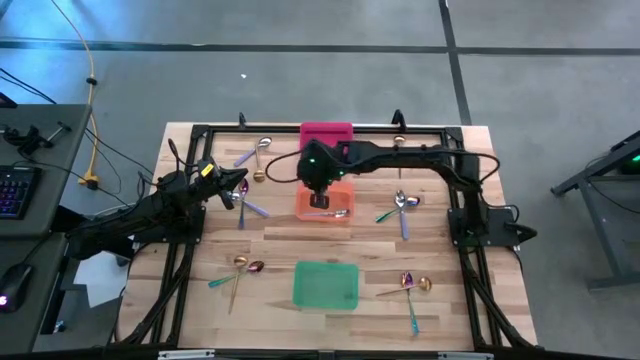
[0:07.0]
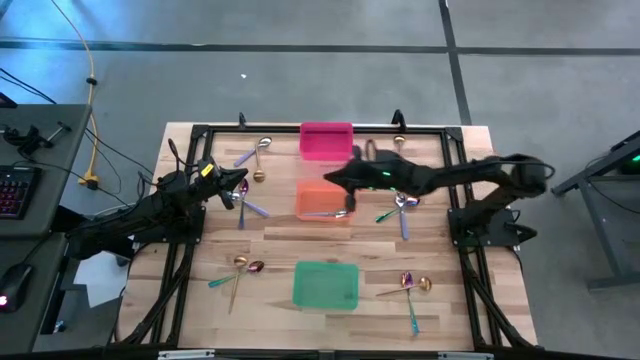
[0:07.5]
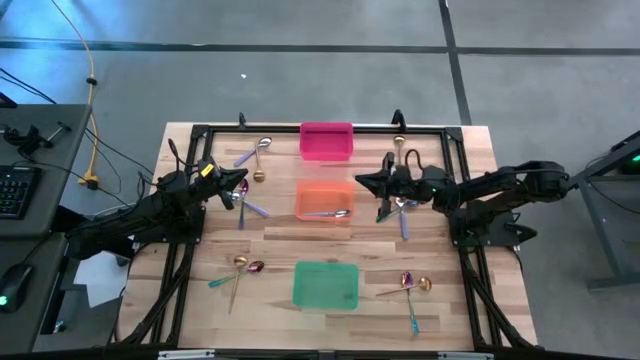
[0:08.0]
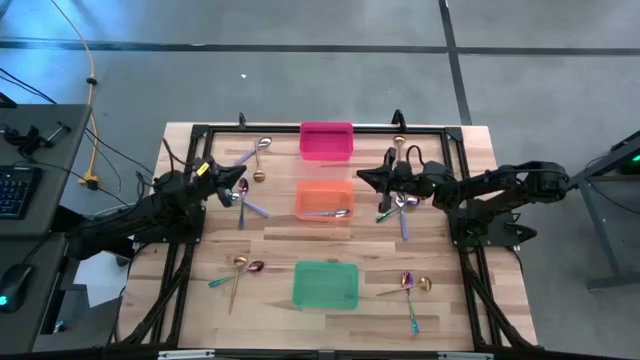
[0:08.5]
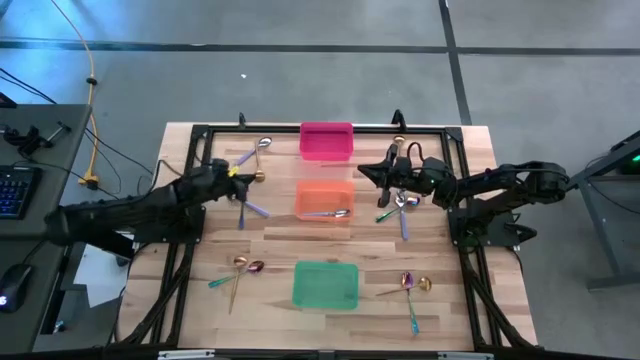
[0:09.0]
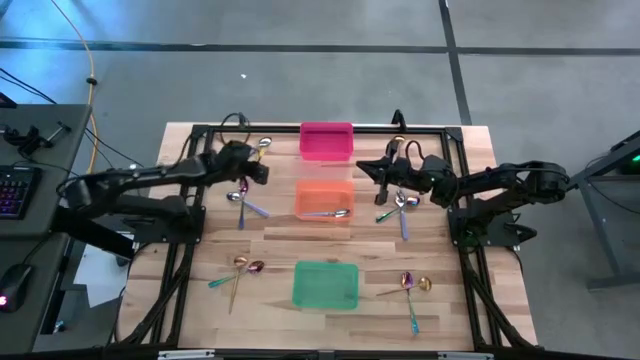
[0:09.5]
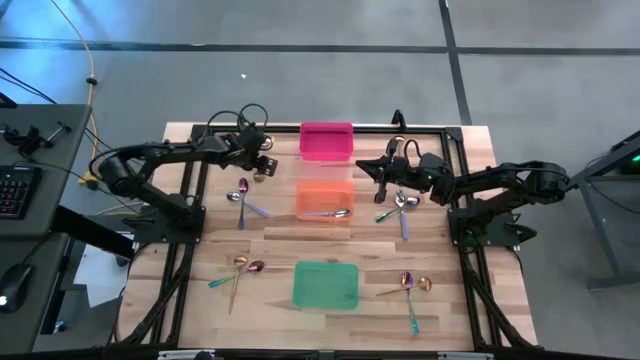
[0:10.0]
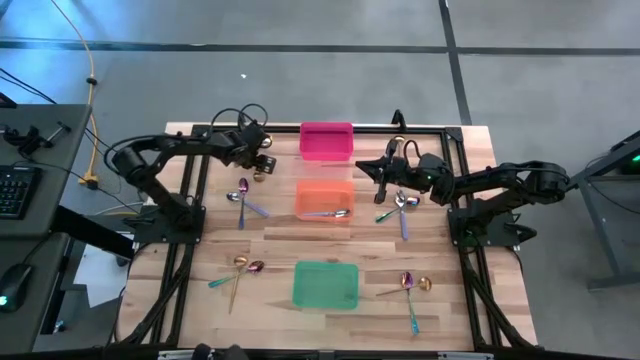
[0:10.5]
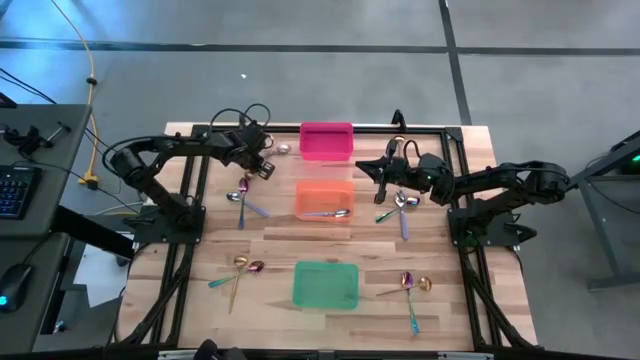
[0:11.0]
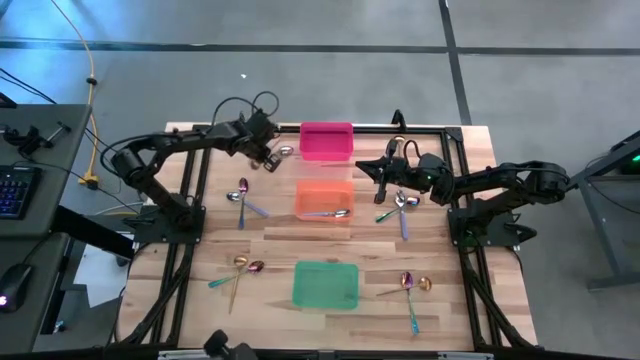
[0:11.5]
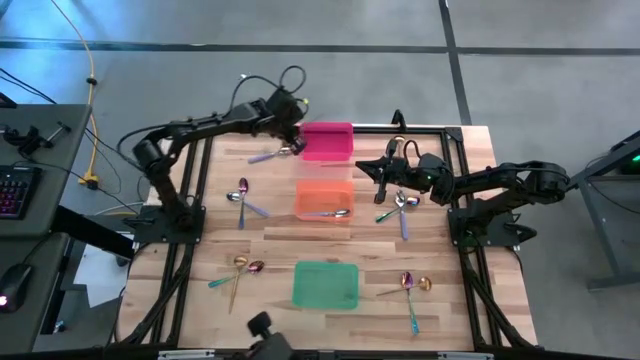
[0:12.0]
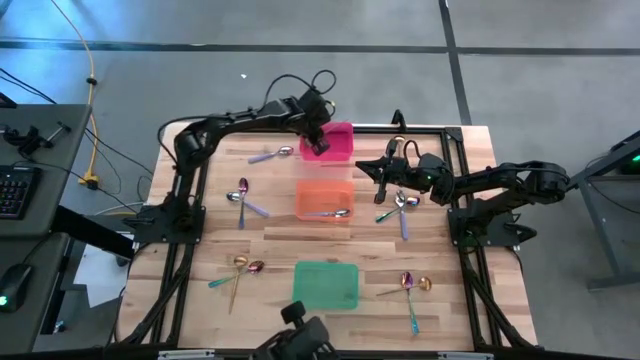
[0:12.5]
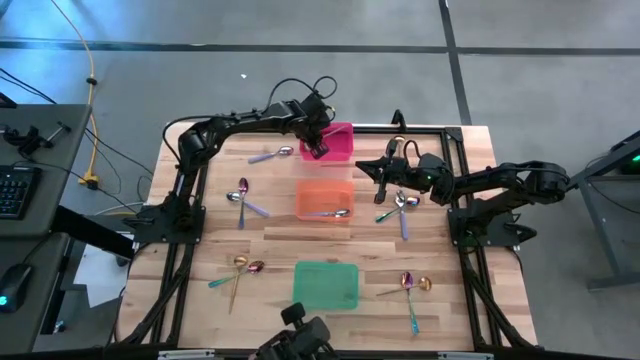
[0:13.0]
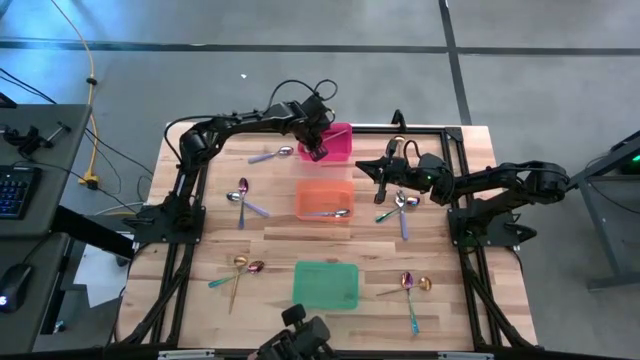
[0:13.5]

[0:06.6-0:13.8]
Task: Sort silverware by color (type)
Put the gold spoon into the red bin

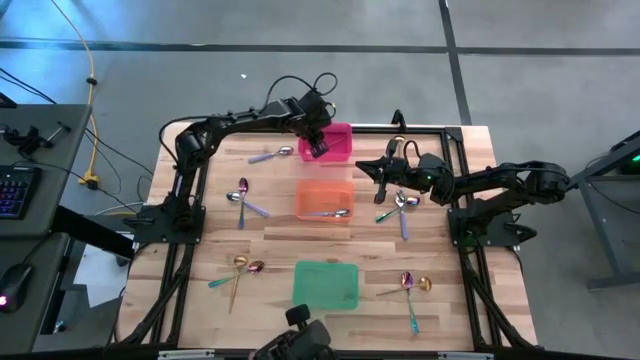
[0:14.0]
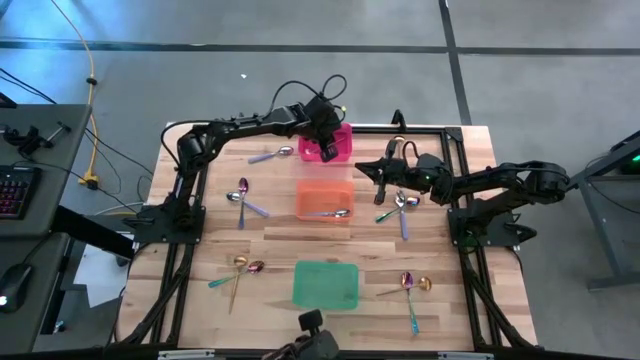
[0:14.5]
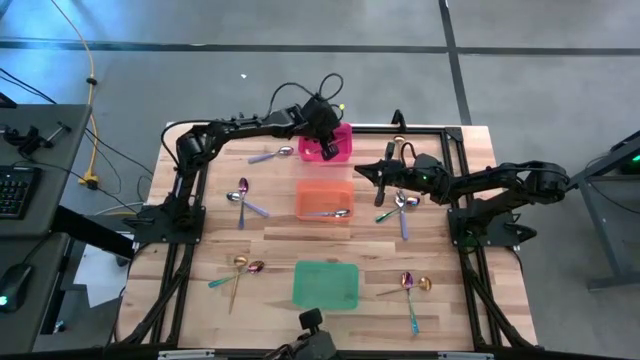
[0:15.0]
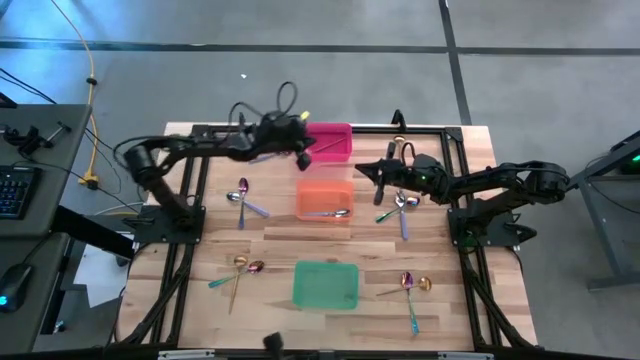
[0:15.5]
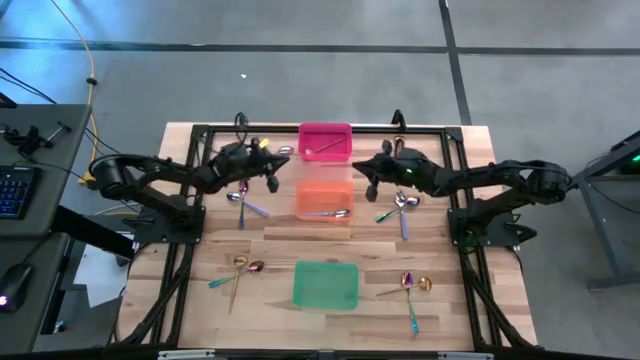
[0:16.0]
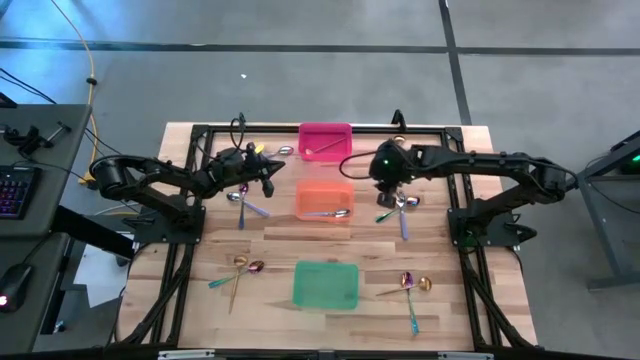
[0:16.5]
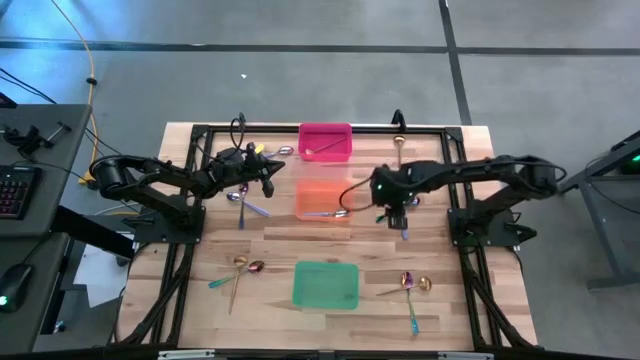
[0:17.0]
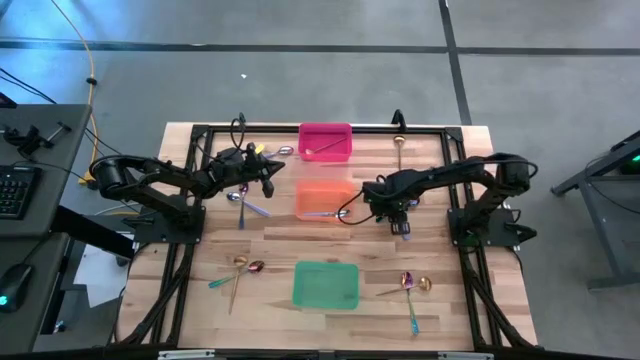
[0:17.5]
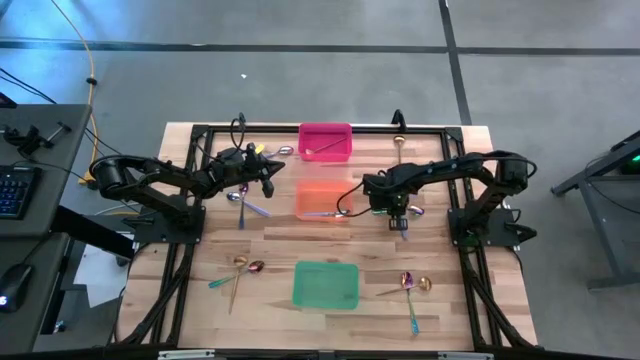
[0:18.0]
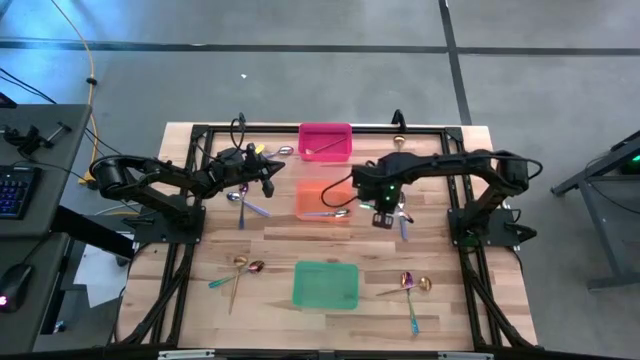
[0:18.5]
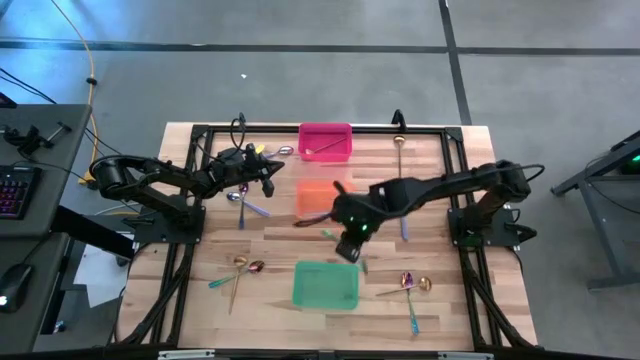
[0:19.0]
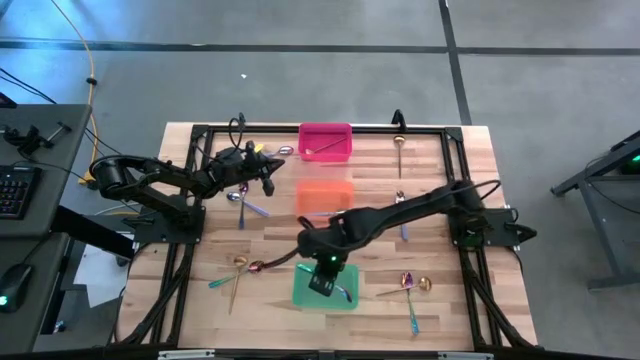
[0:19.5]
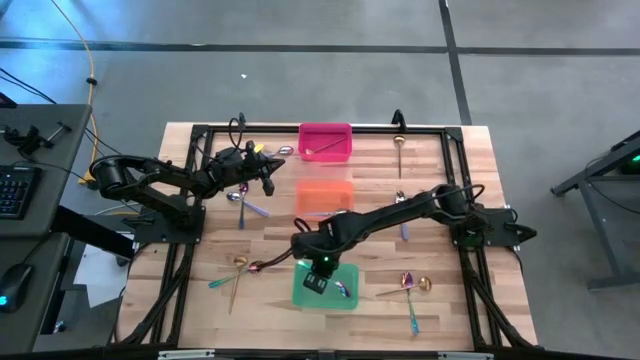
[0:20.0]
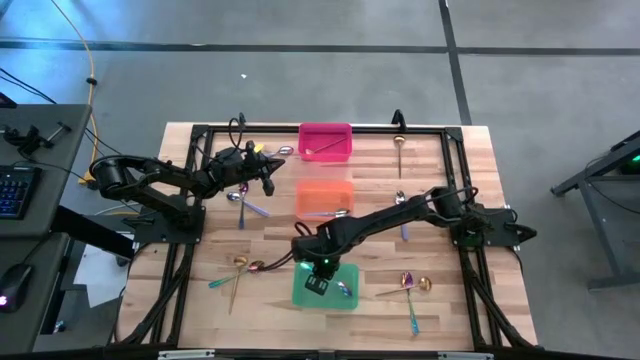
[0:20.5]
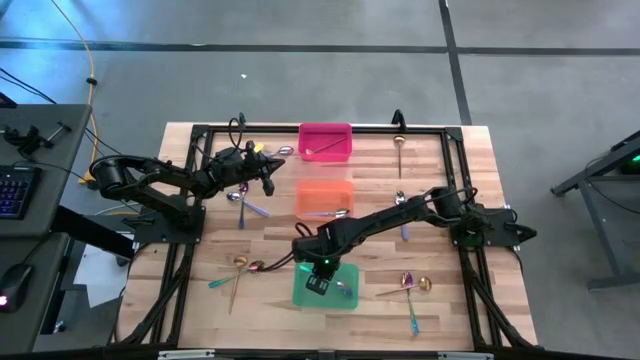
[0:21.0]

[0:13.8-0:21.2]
Put the blue spoon into the green bin

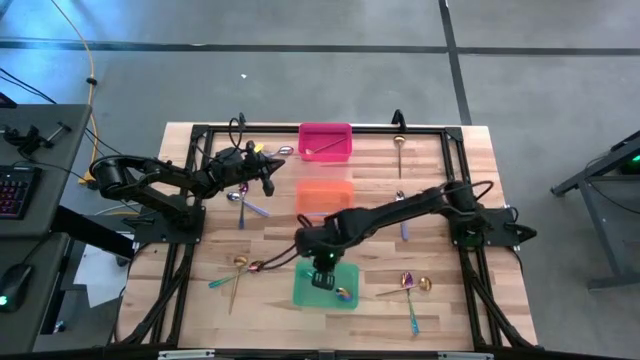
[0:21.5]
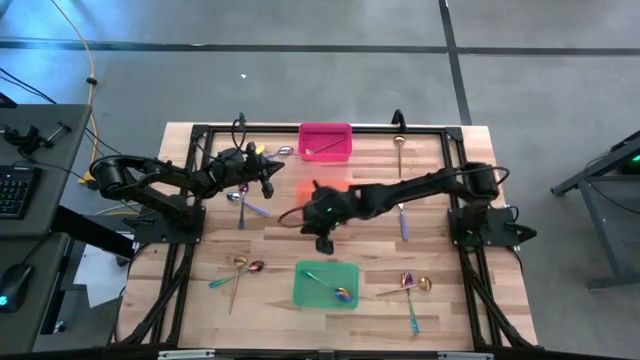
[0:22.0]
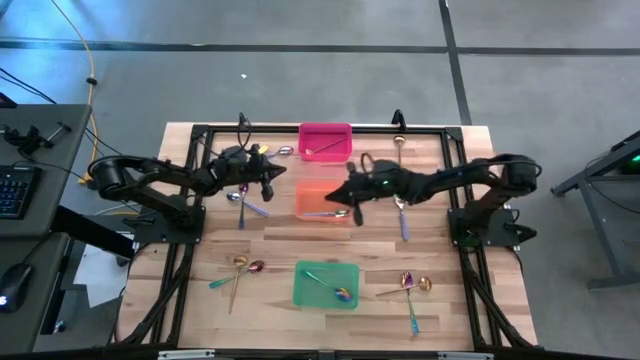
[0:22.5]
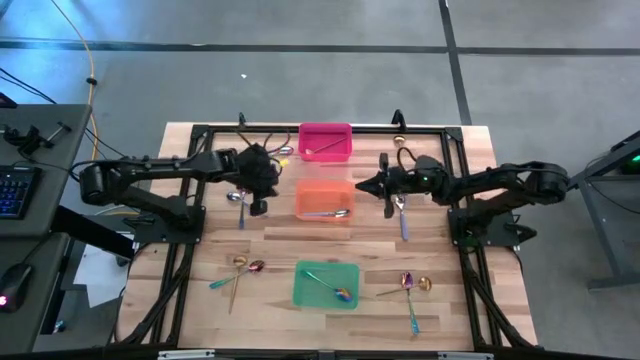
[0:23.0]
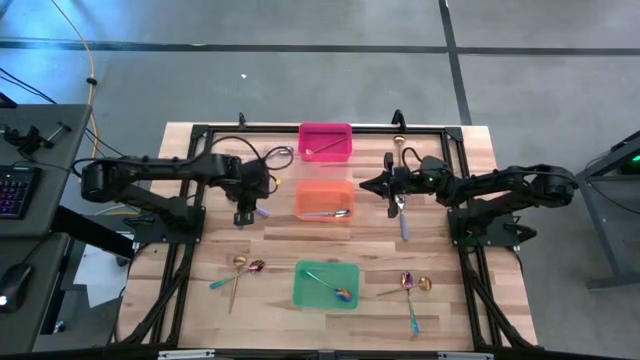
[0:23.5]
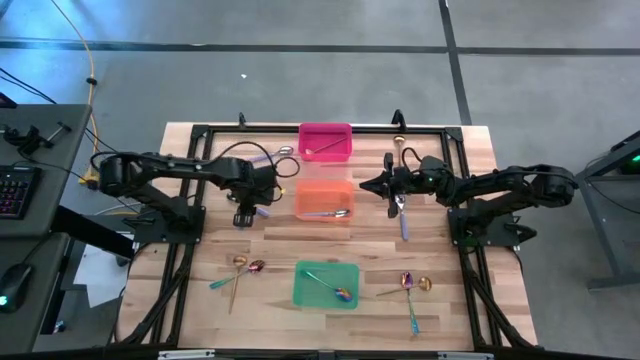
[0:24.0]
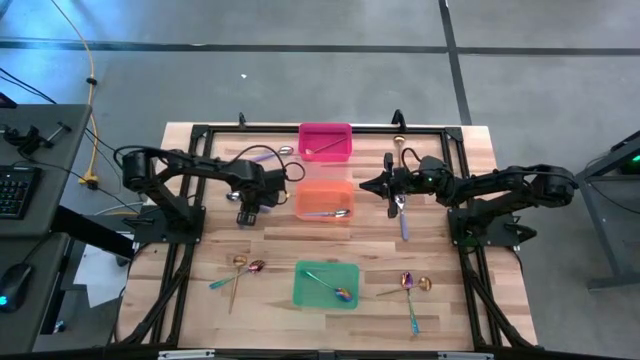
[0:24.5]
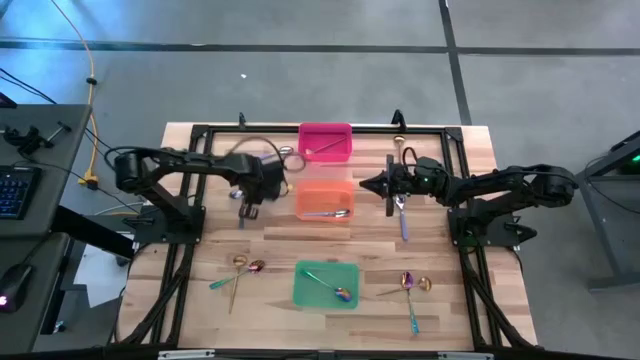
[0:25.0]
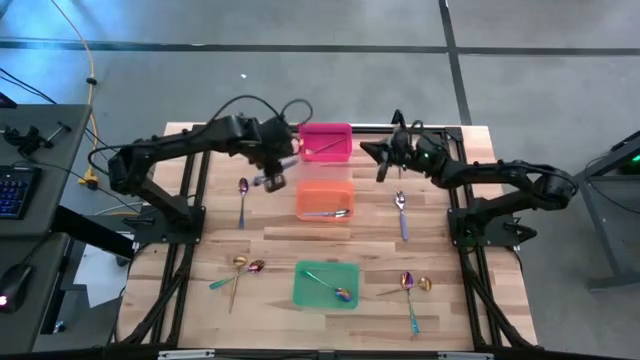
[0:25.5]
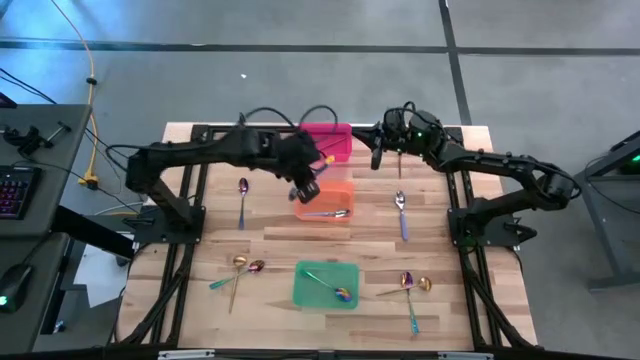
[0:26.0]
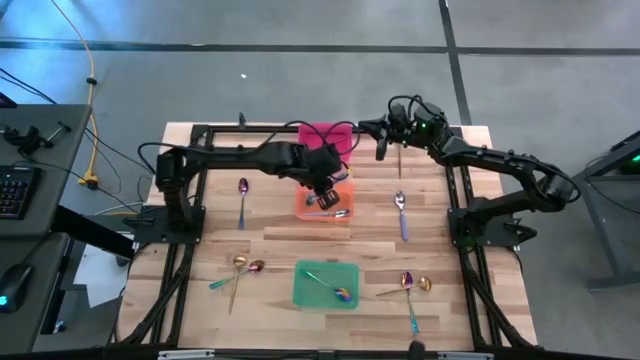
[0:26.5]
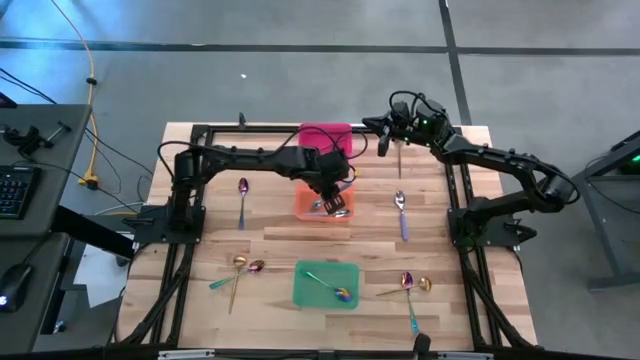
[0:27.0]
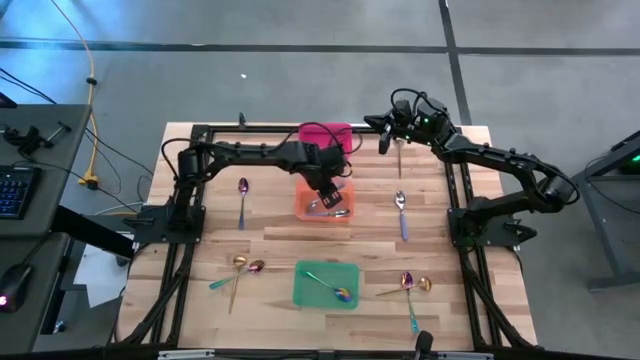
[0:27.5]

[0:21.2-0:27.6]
Put the purple spoon into the orange bin

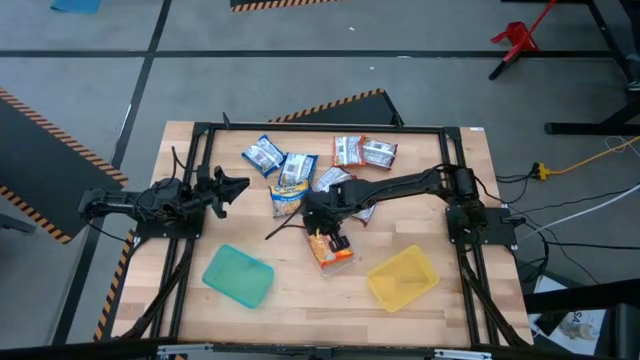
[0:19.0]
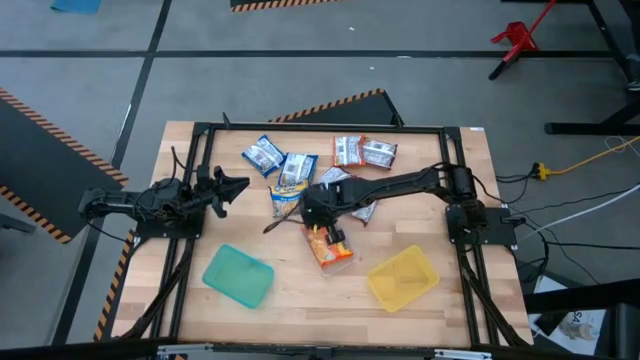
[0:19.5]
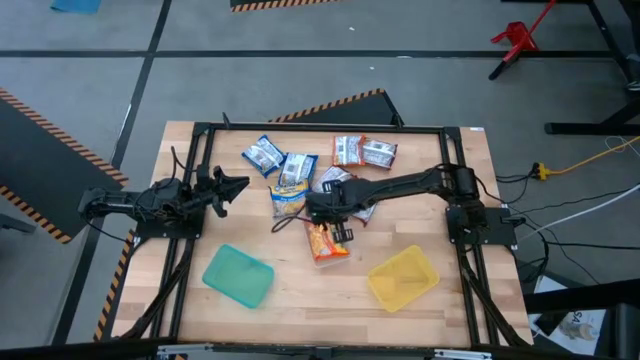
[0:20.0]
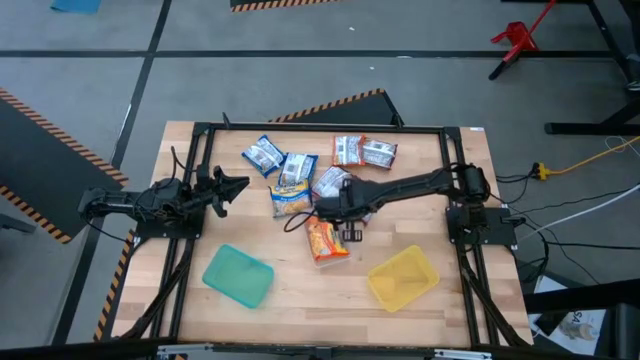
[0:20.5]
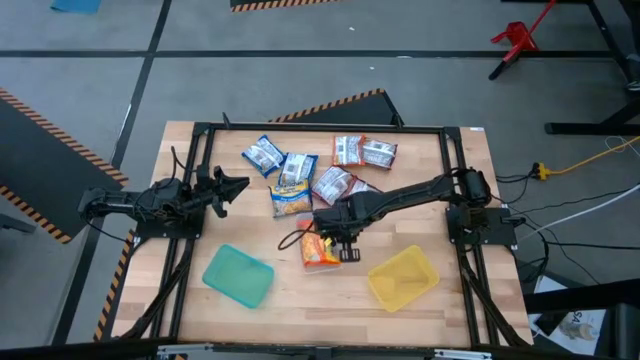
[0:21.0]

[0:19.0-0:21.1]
Task: Sort Maruchan noodles
Adjust the transparent bin
